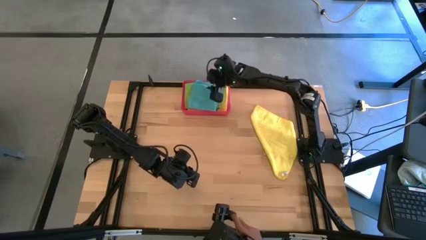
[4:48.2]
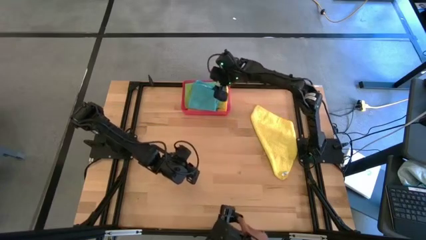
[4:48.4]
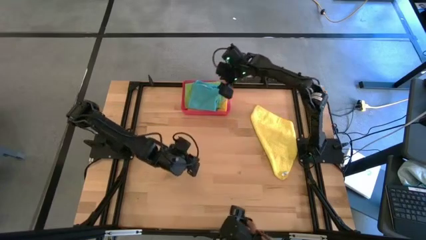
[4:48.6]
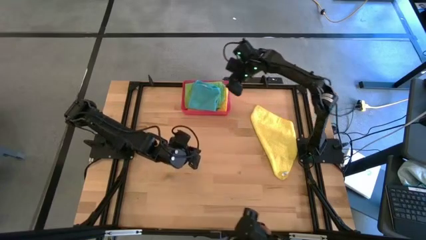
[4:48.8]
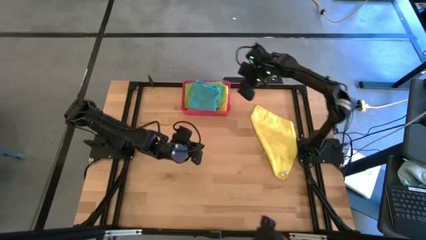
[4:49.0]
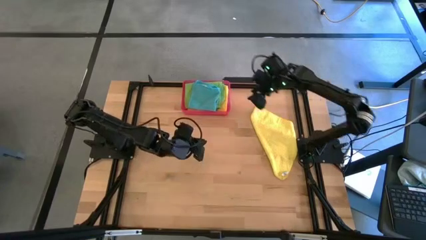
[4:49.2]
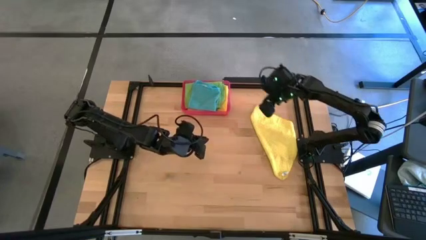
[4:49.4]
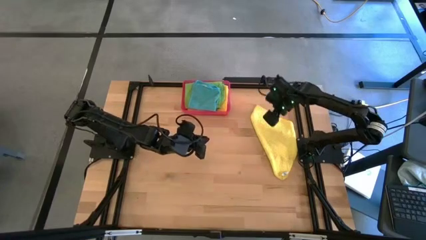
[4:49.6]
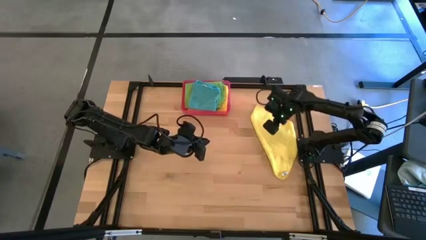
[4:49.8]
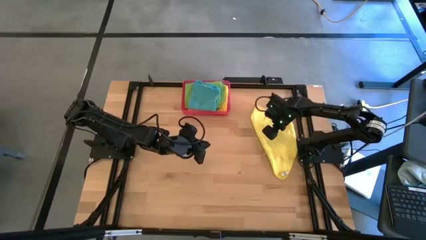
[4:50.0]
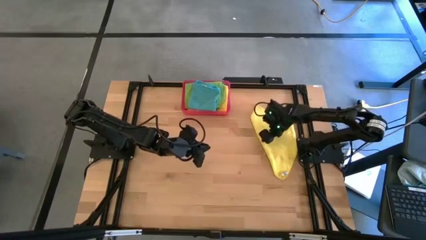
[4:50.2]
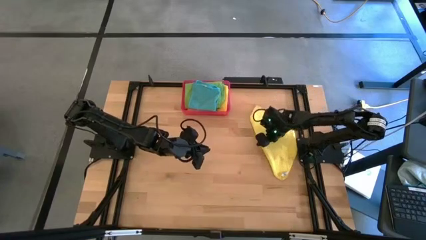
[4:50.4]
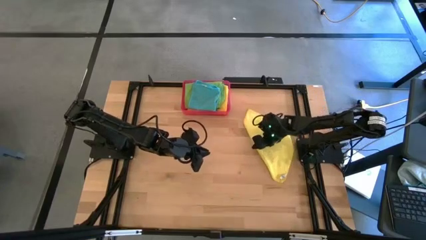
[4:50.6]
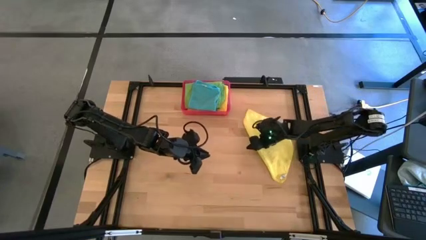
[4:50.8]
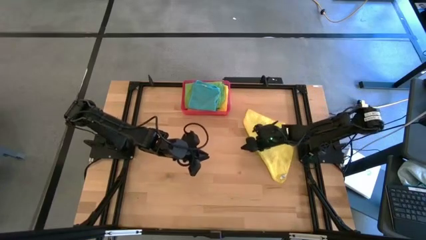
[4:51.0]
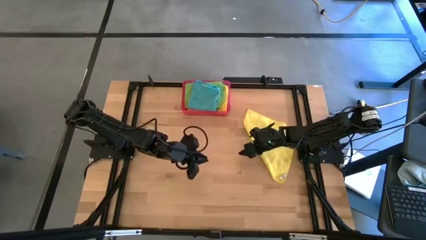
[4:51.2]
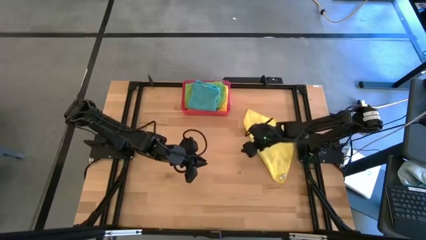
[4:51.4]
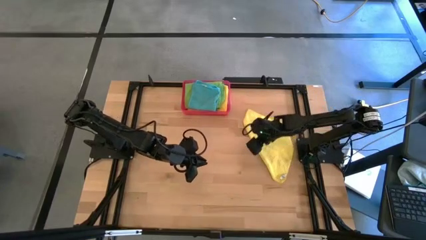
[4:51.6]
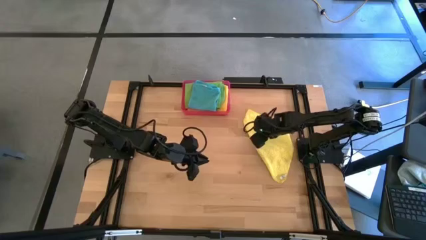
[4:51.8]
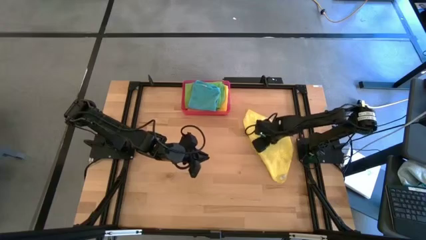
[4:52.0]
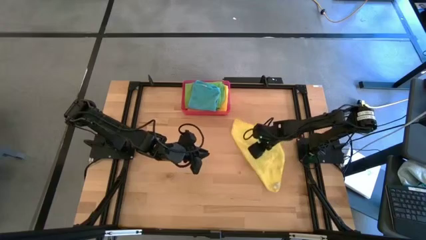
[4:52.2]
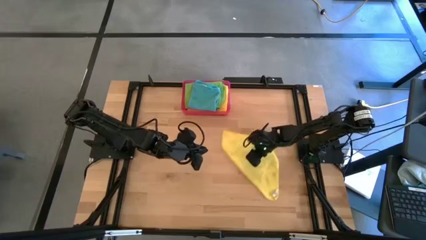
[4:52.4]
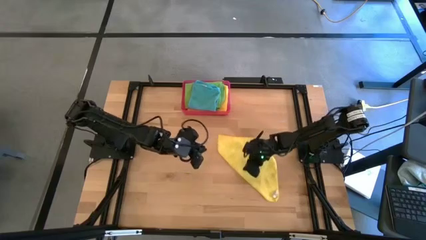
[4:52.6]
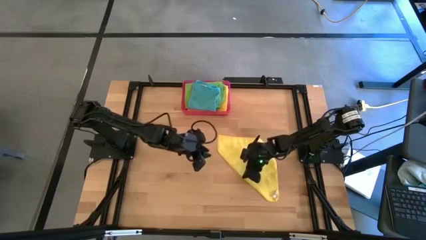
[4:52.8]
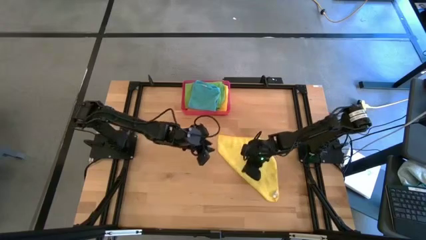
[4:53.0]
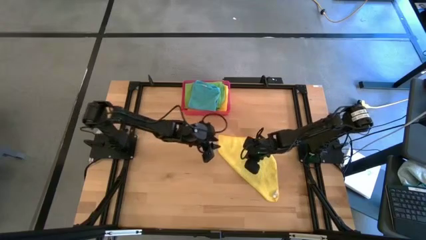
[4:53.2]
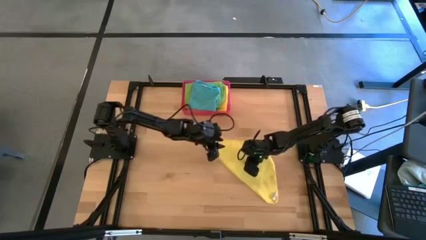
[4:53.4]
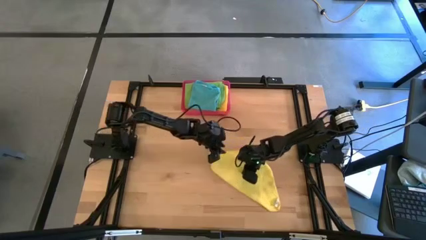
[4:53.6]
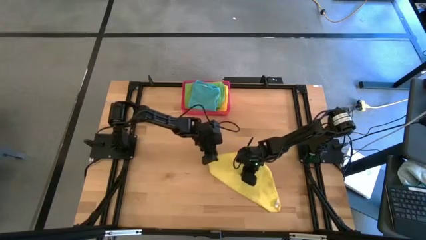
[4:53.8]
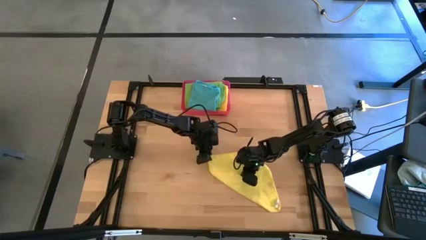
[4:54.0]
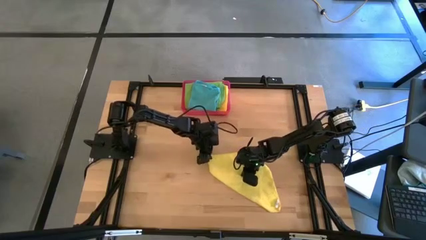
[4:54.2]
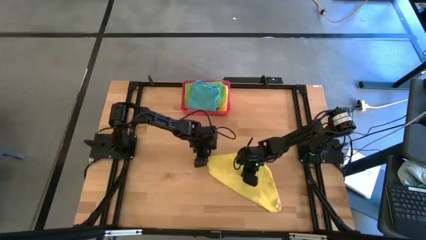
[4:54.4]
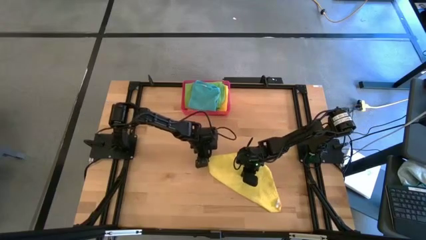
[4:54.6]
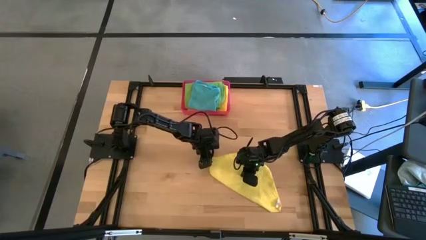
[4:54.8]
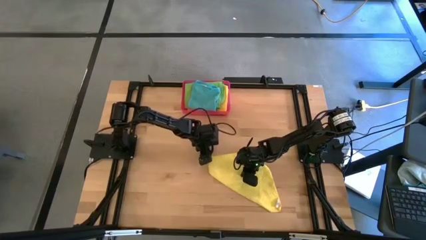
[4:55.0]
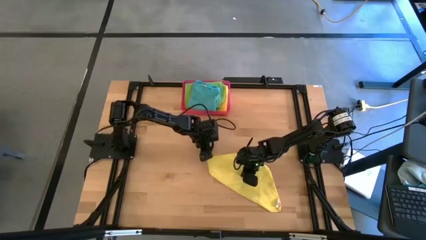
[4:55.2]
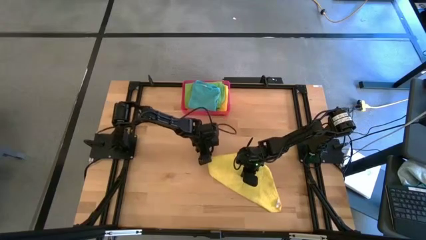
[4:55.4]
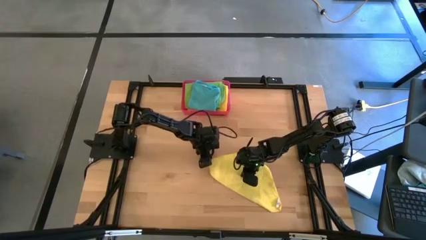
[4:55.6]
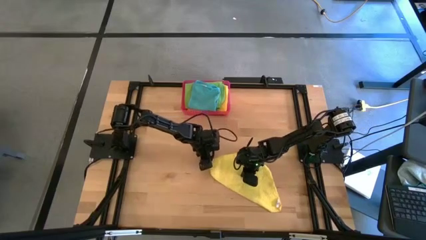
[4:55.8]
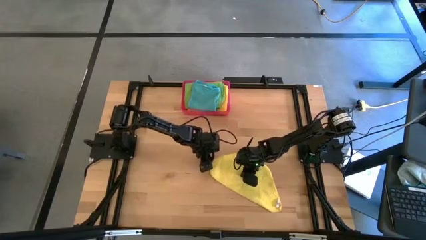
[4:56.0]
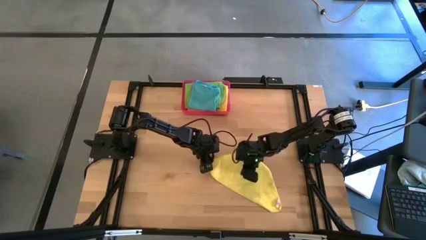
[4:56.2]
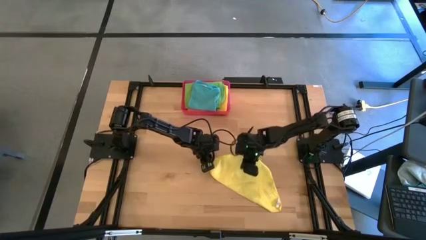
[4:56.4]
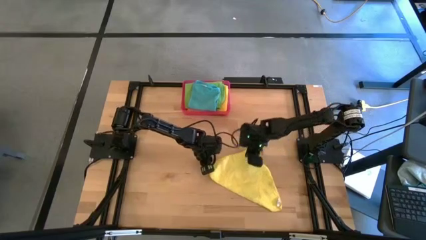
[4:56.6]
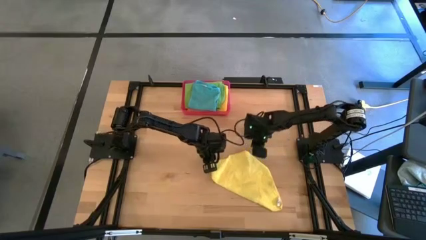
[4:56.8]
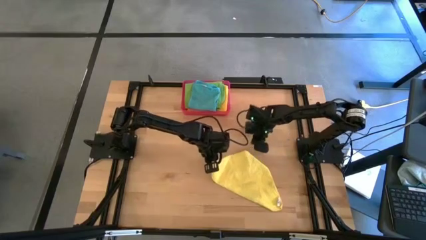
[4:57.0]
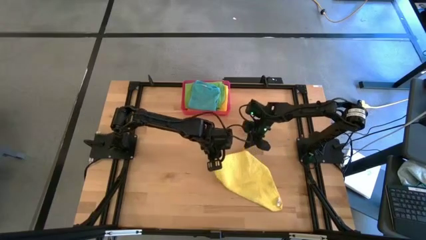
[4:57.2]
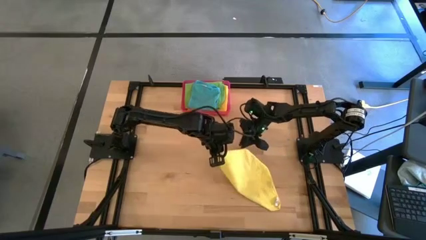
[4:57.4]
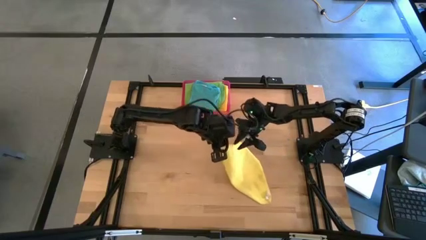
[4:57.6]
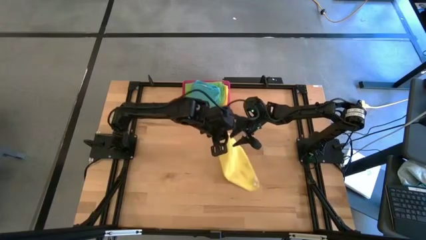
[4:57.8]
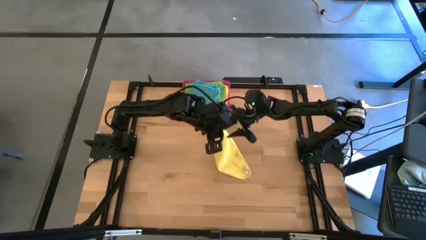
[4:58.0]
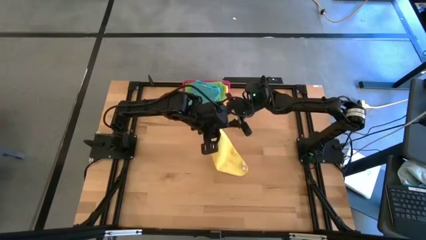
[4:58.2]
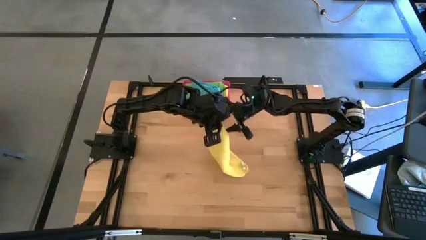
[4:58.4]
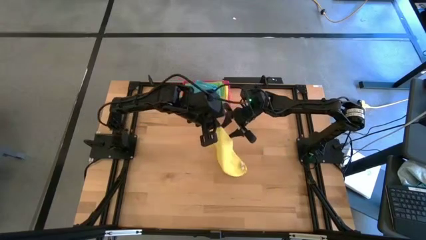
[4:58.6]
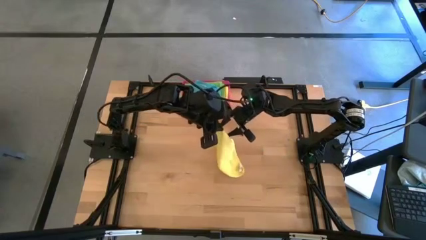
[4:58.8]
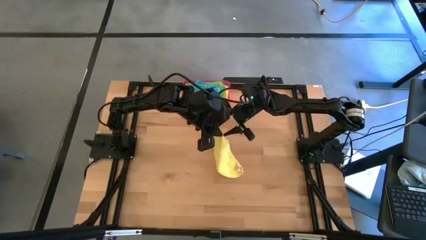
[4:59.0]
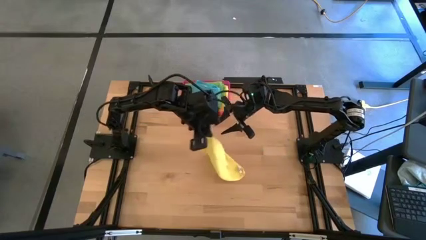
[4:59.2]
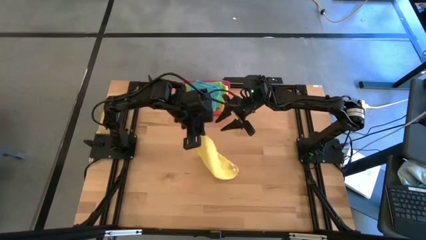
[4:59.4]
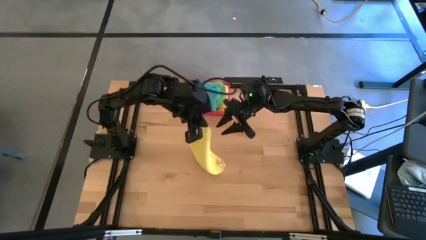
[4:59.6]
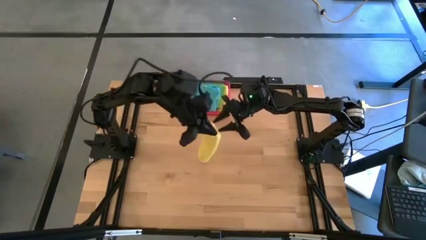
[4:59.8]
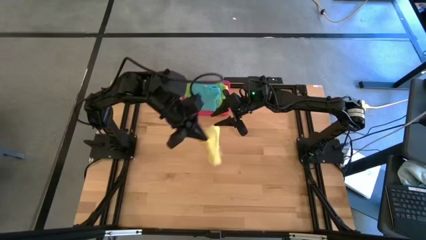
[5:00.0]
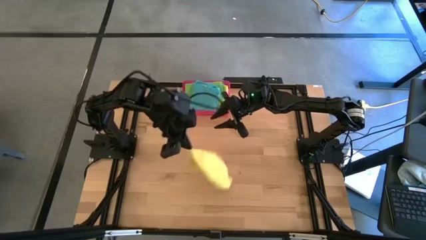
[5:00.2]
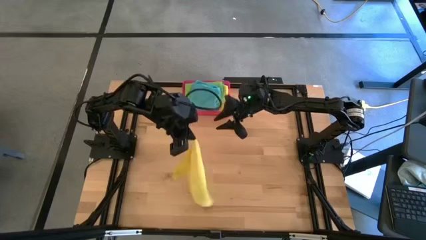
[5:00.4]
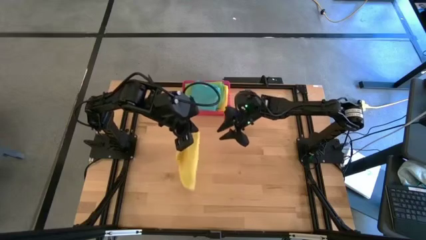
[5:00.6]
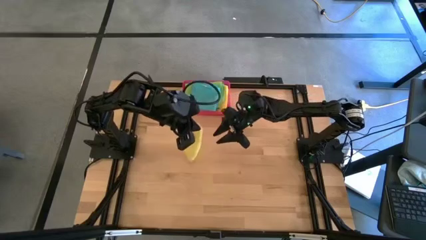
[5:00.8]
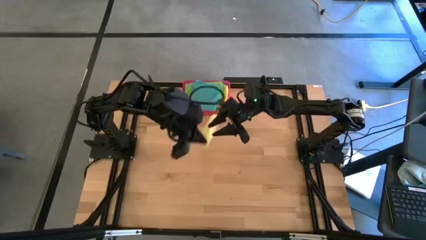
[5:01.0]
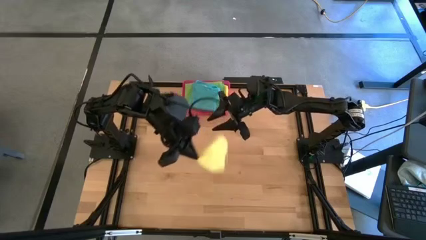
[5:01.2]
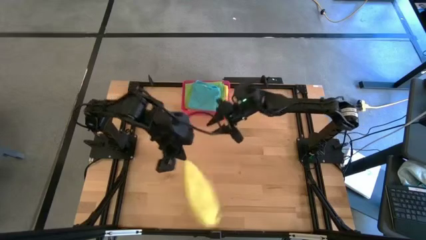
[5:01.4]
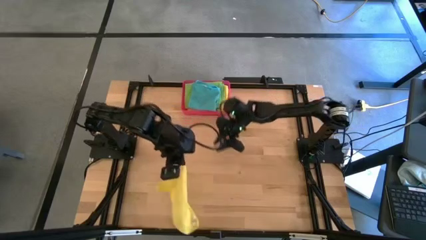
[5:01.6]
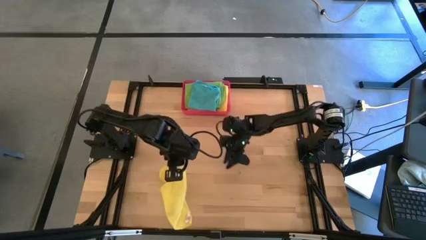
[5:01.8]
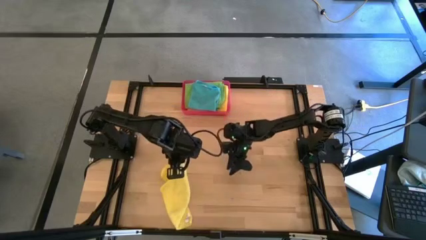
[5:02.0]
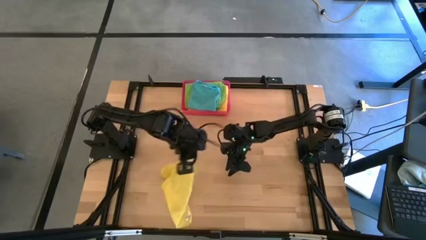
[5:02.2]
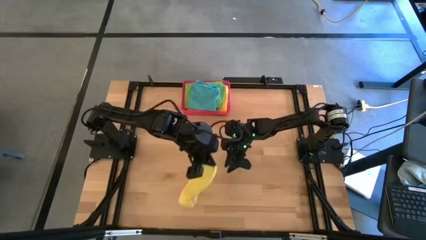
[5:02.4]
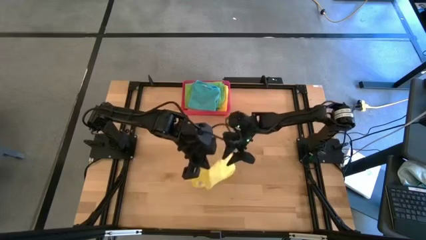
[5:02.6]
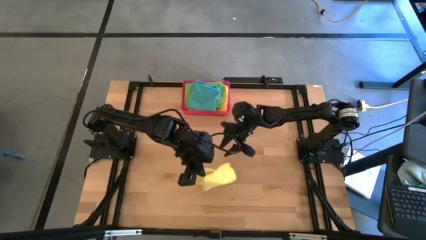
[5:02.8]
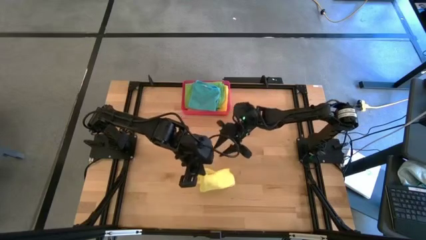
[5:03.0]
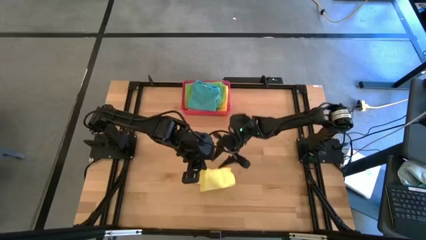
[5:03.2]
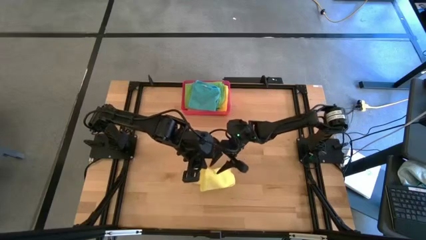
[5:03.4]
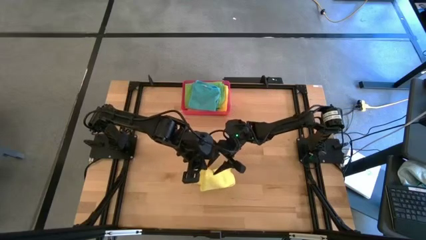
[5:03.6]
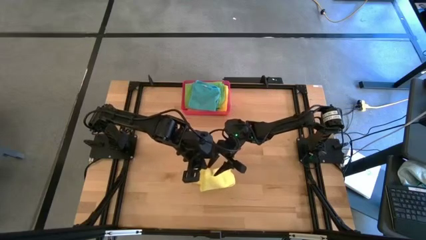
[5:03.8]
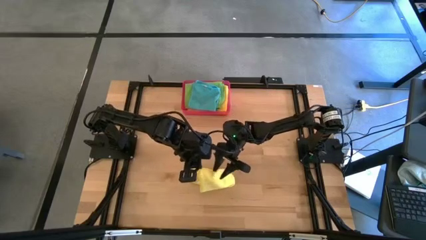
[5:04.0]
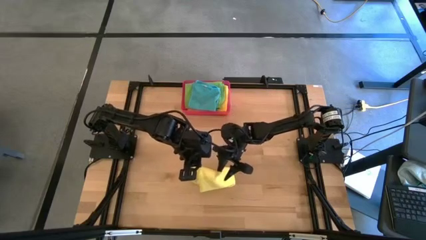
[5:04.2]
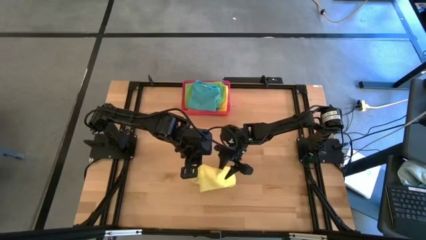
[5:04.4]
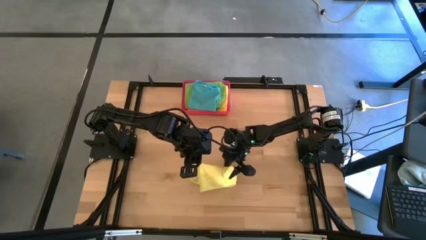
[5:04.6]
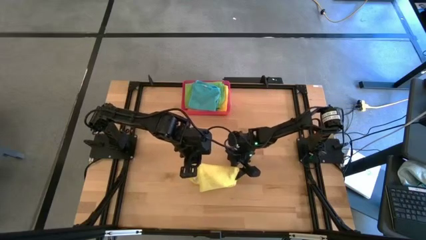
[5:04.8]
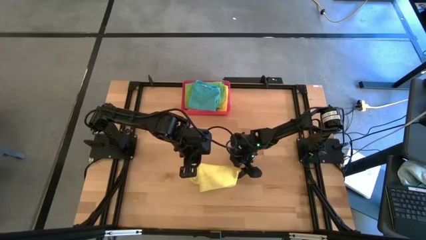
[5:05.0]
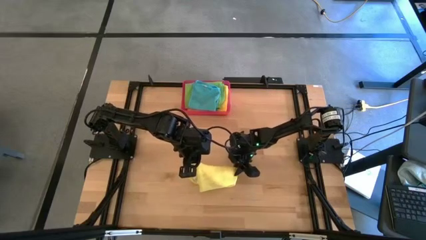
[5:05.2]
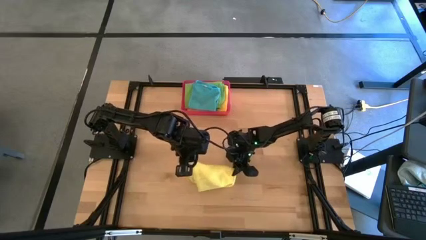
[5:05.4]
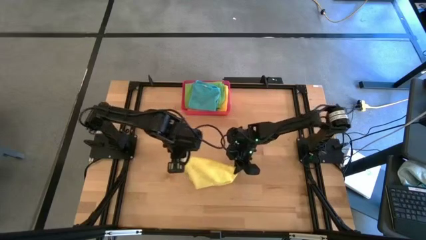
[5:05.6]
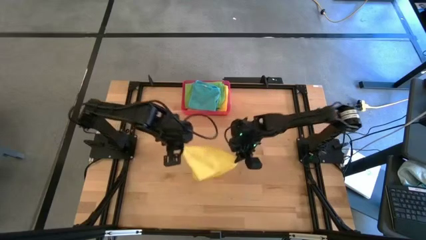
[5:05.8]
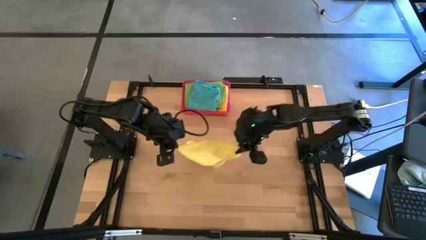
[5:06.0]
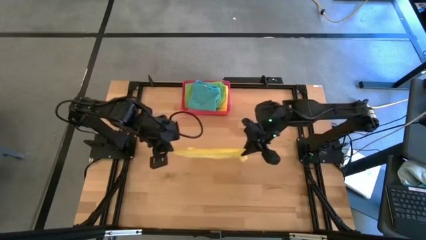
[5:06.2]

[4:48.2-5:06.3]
Task: Fold microfiber towels
Fold the yellow microfiber cloth
